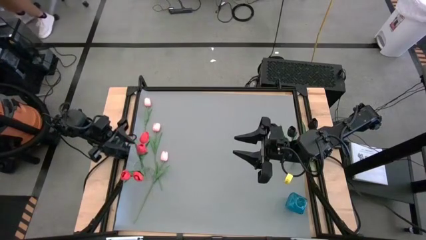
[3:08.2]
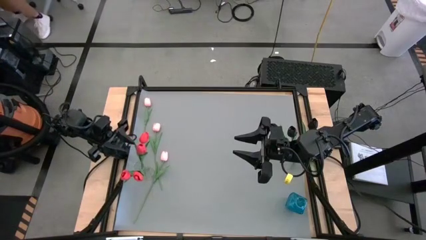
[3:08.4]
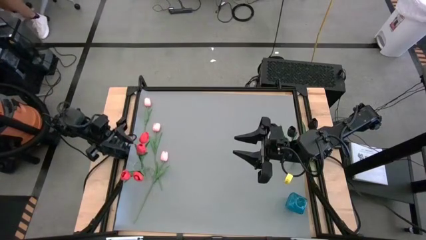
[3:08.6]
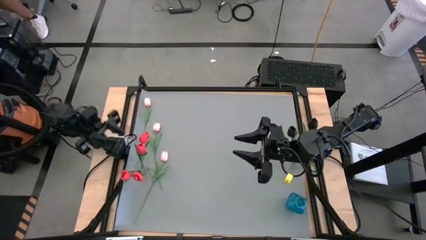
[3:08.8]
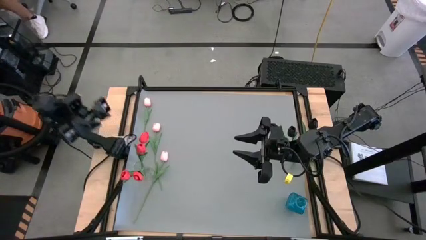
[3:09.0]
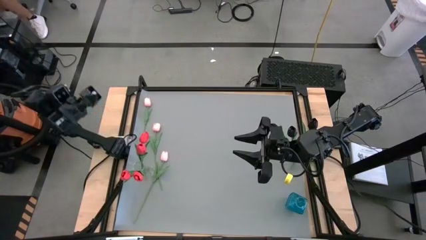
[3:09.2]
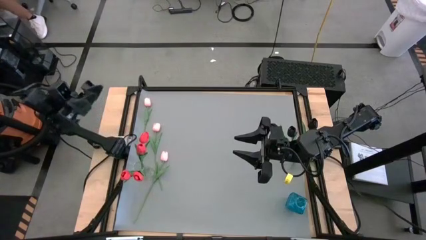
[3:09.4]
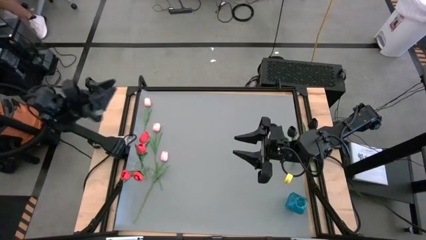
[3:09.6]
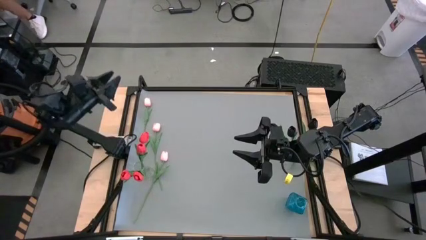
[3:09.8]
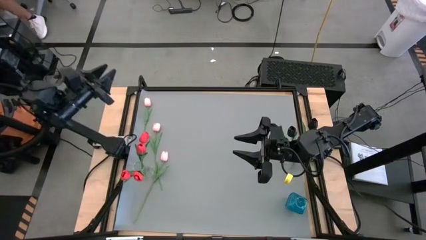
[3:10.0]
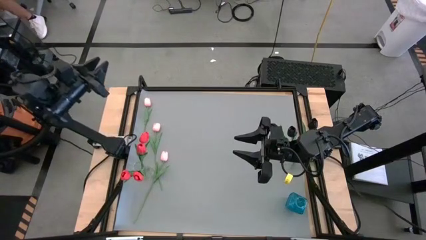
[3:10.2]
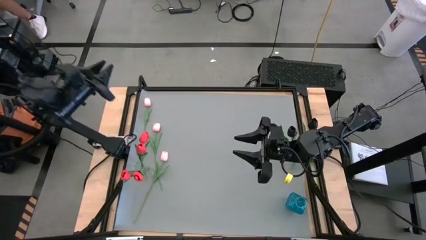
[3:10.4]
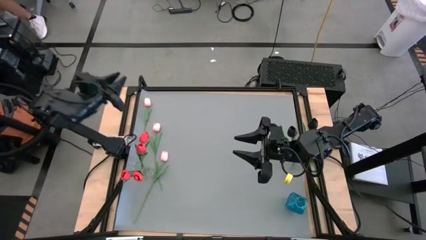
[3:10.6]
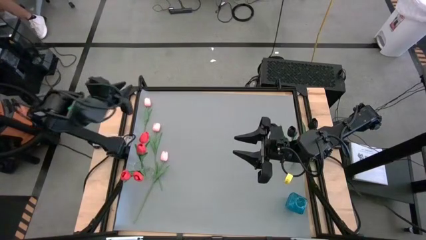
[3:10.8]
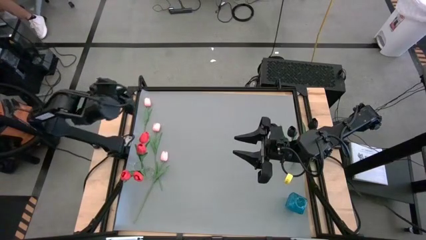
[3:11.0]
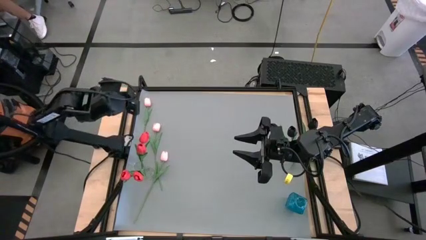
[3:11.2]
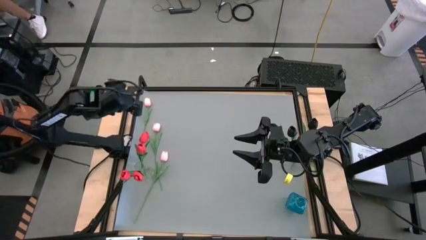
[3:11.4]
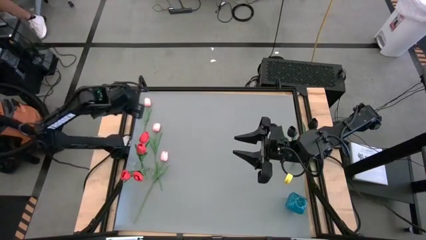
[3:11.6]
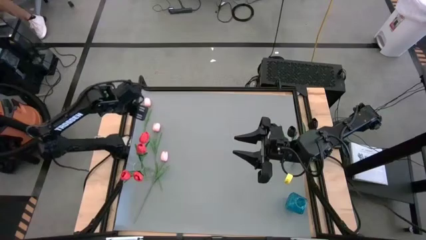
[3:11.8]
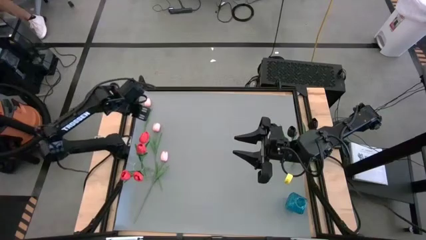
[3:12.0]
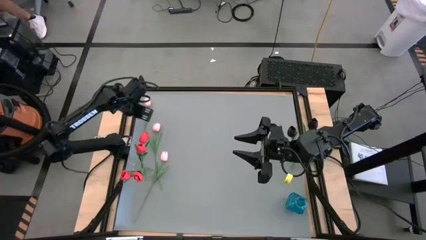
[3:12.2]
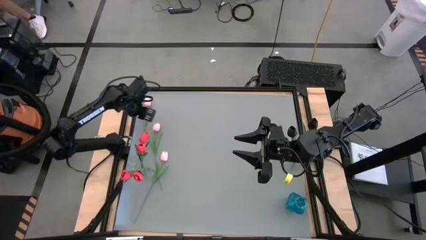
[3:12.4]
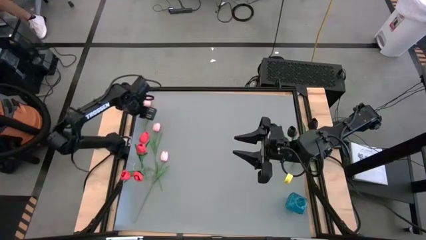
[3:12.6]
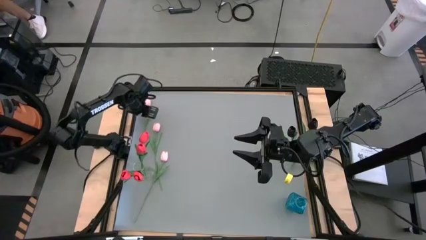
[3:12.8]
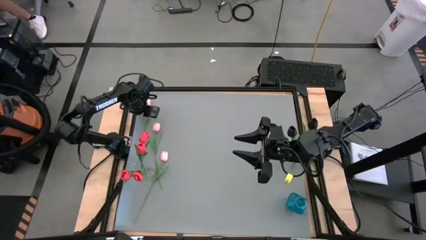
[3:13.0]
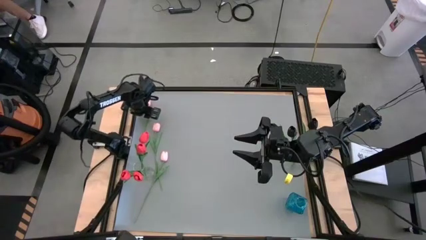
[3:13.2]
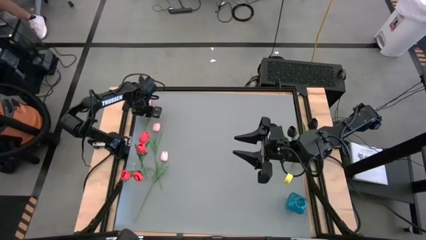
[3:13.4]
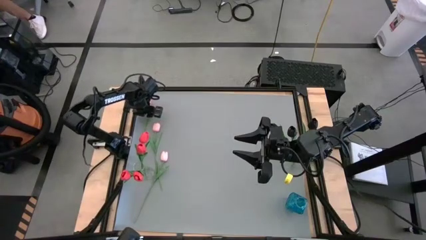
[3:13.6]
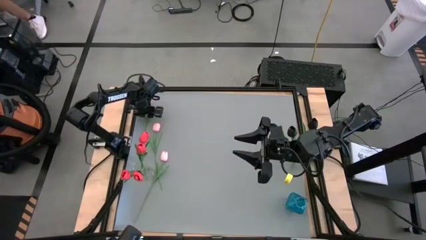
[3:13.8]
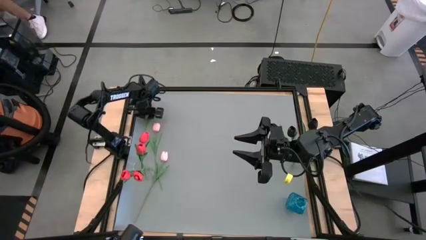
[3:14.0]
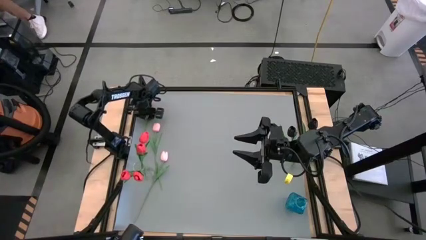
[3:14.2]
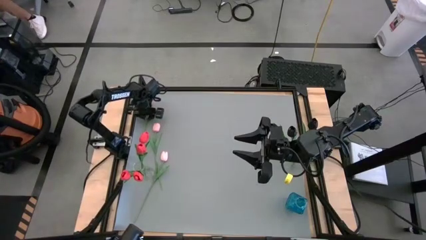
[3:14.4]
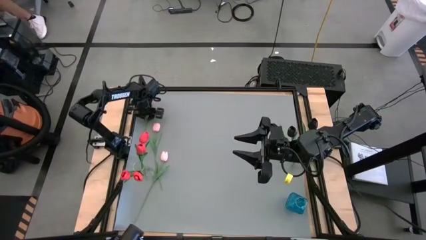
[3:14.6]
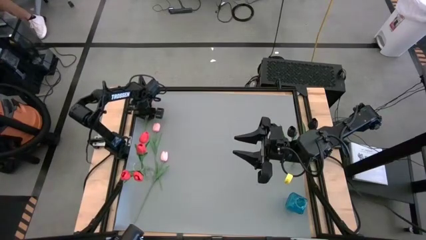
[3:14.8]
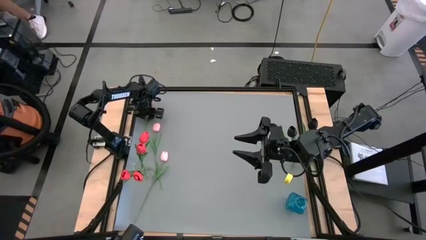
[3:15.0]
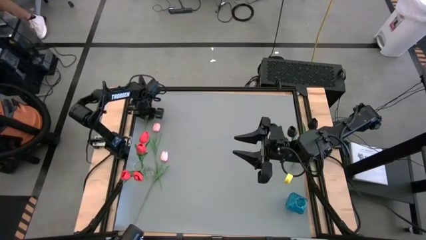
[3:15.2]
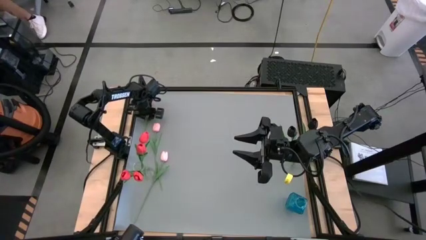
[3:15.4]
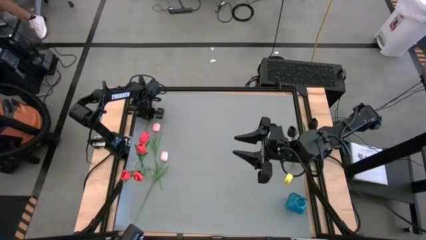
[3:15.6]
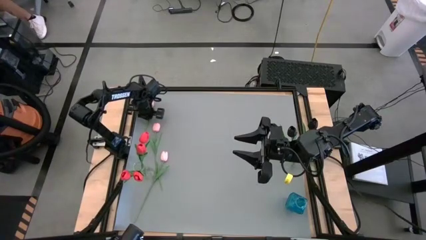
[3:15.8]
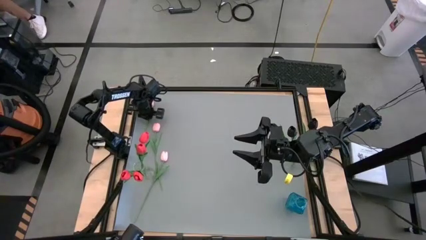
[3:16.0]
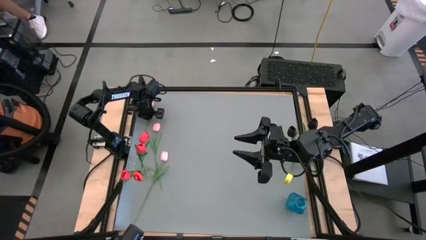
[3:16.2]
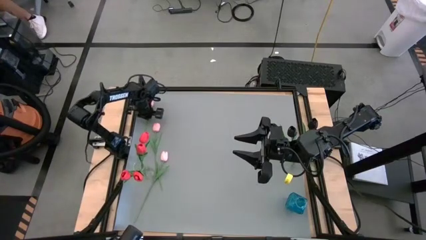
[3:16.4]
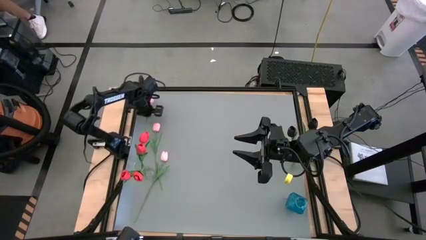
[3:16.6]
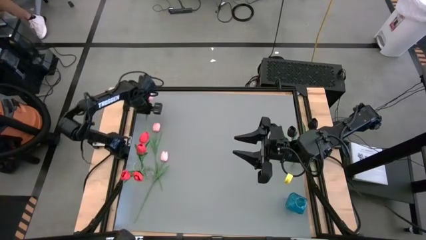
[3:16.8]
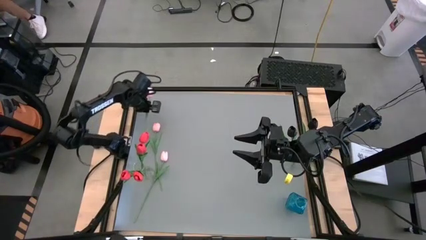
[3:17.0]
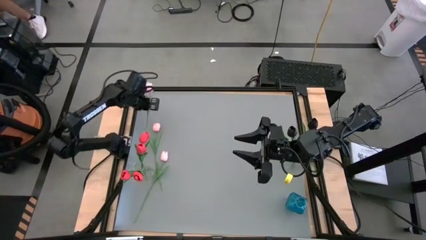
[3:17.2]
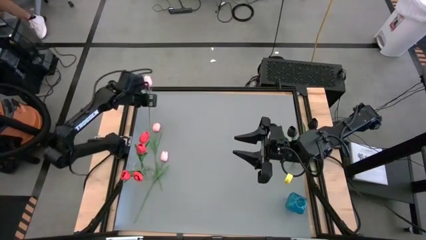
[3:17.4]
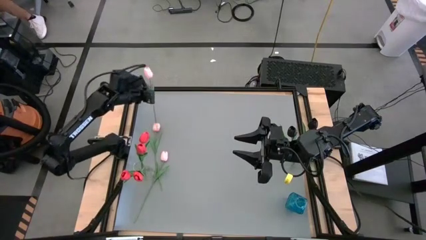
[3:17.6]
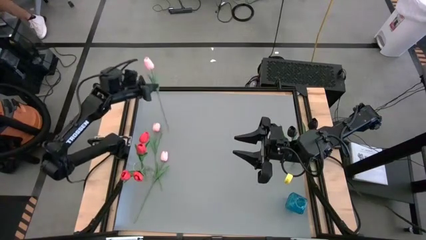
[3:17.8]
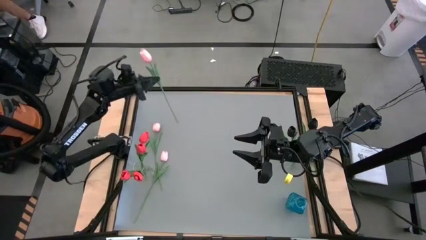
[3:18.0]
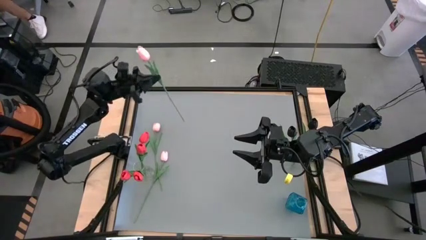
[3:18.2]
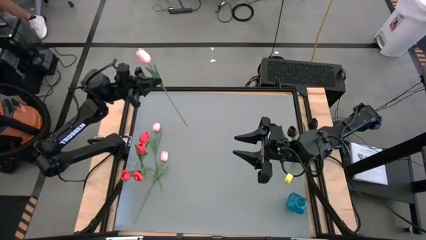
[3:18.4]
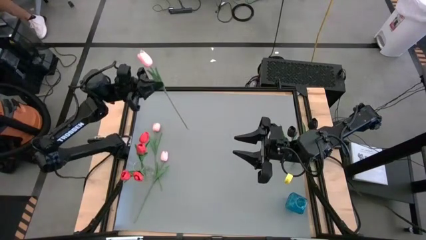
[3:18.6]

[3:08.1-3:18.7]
Task: Sort flowers into vase by color
Put the top pink tulip into the blue vase

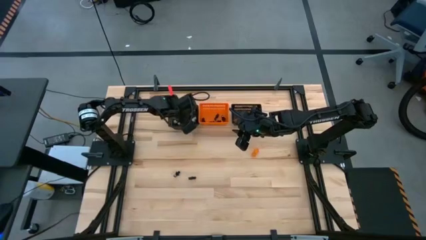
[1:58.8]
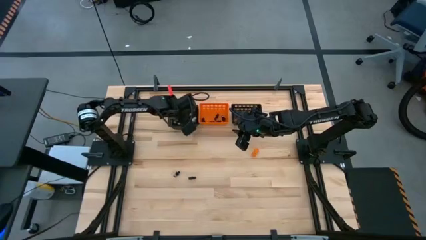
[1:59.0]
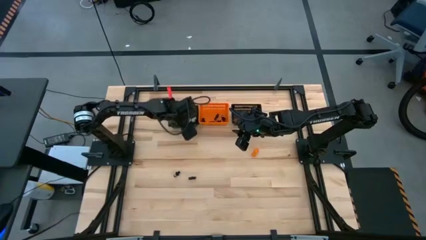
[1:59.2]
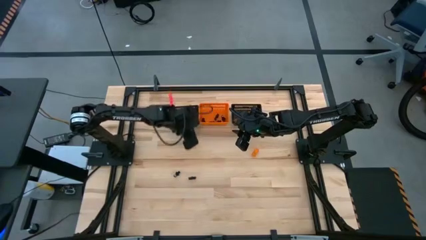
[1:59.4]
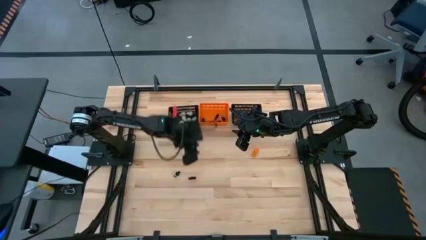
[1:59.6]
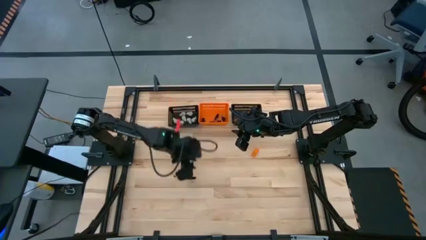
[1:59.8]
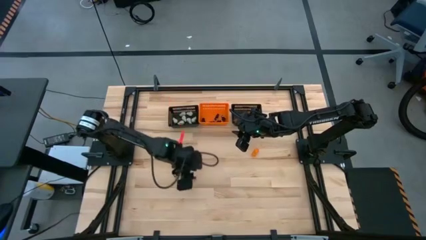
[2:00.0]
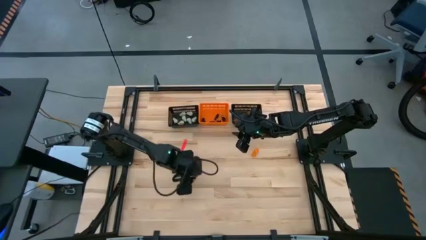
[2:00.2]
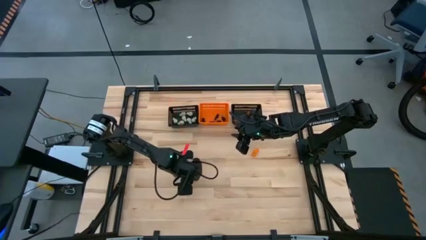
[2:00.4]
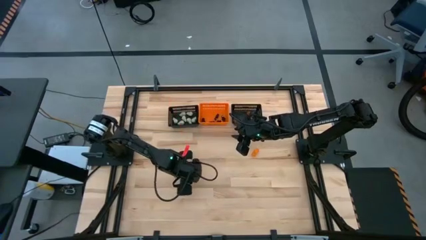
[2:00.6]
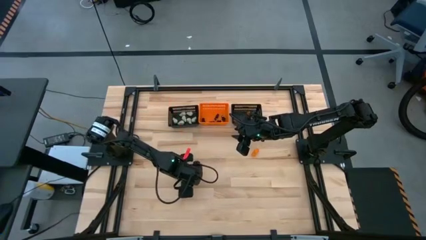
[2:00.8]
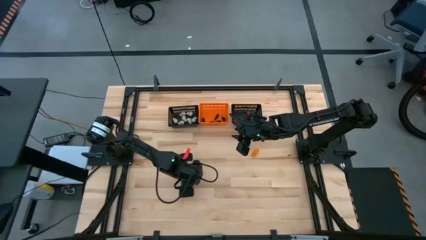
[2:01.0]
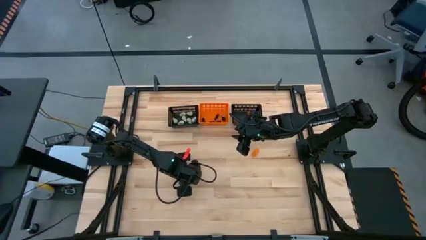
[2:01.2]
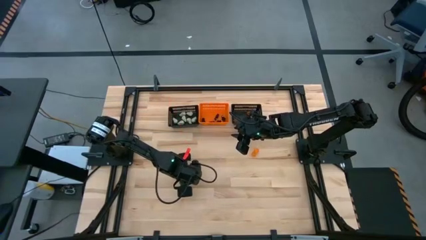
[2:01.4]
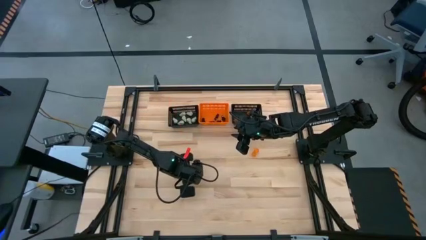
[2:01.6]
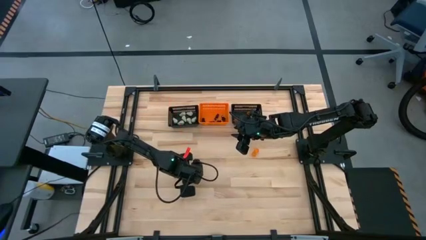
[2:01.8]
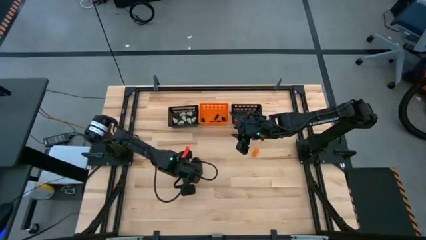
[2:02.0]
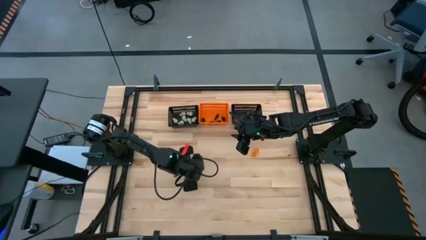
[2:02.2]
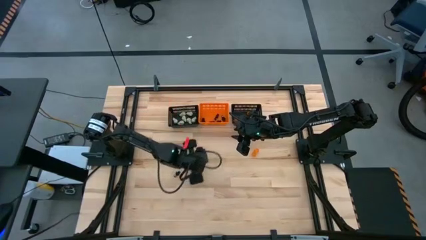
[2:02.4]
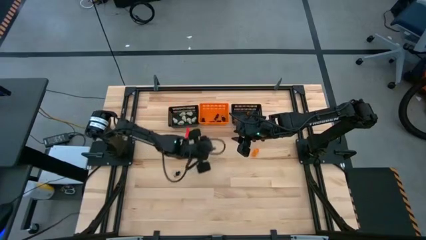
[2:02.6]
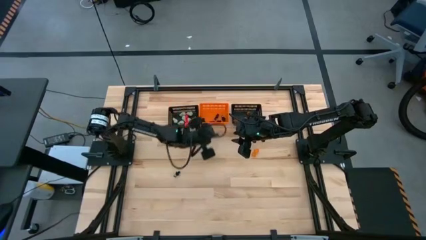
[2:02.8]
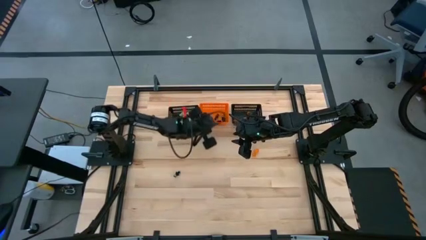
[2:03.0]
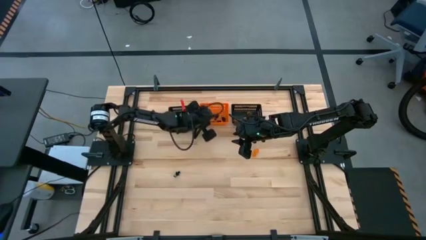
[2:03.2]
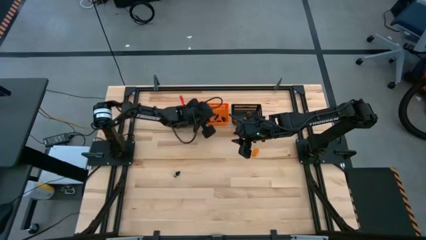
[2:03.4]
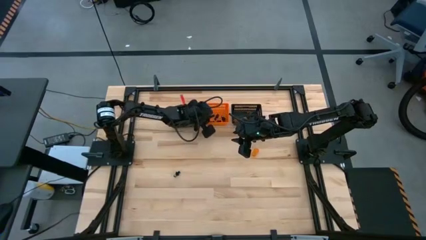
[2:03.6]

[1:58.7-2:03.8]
Task: Sort Halloween decoration
Put the black skeleton toy into the orange bin
